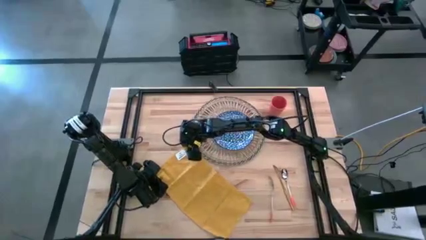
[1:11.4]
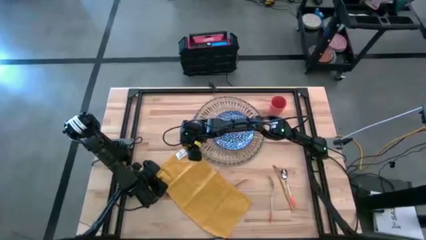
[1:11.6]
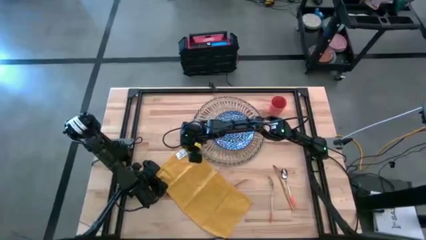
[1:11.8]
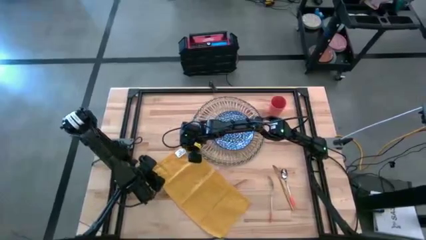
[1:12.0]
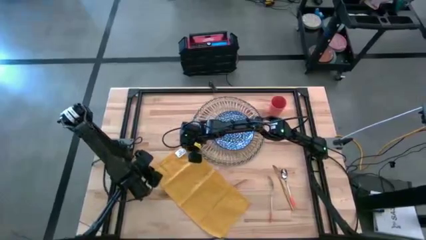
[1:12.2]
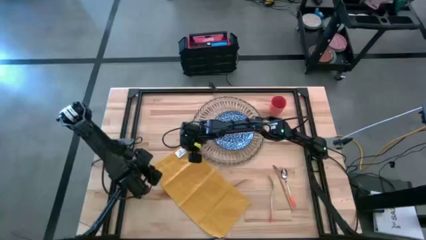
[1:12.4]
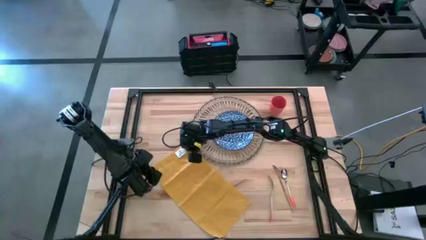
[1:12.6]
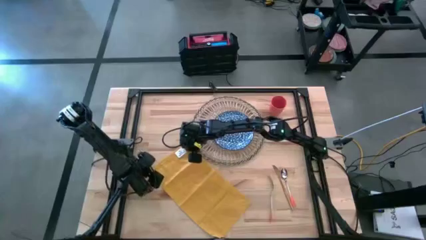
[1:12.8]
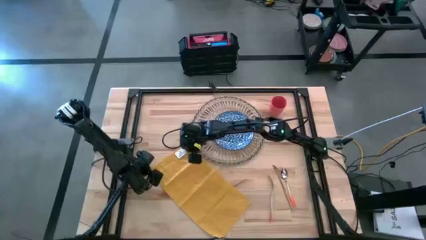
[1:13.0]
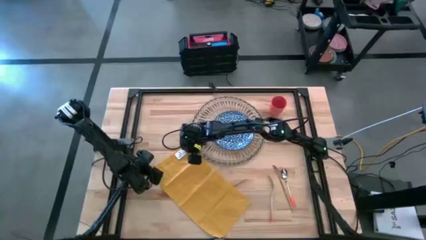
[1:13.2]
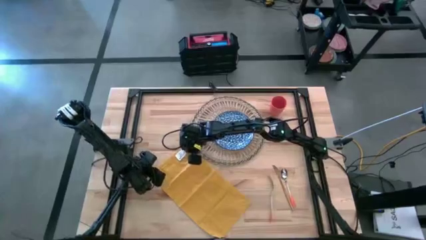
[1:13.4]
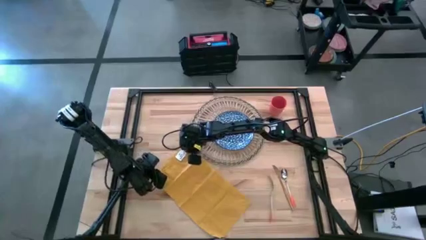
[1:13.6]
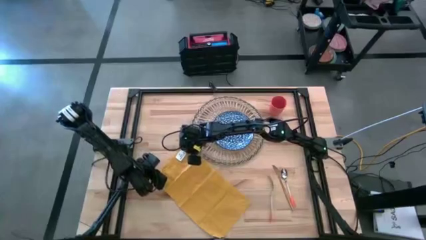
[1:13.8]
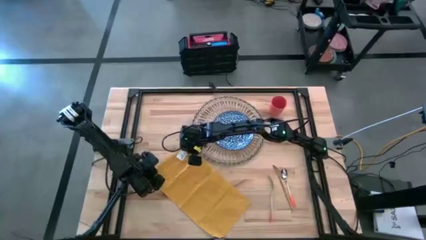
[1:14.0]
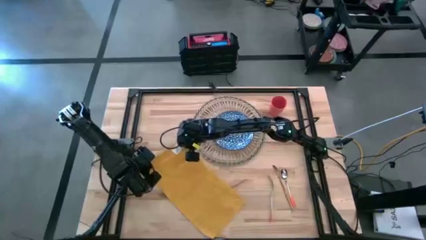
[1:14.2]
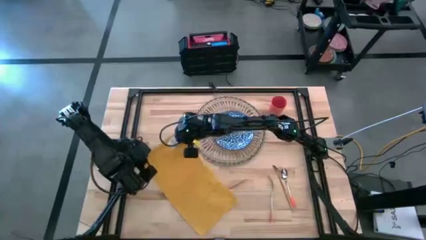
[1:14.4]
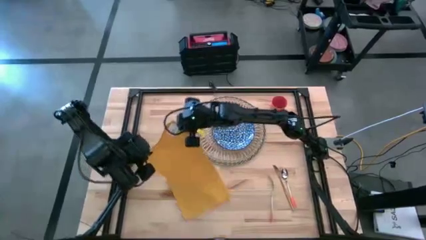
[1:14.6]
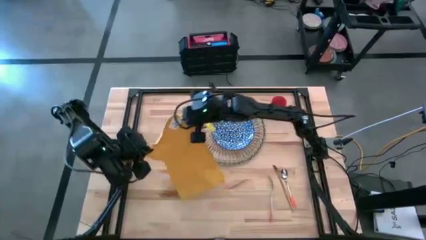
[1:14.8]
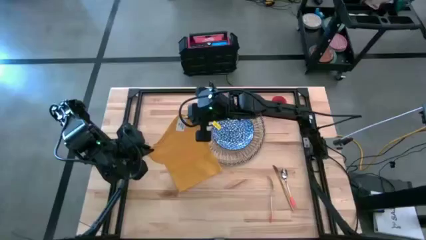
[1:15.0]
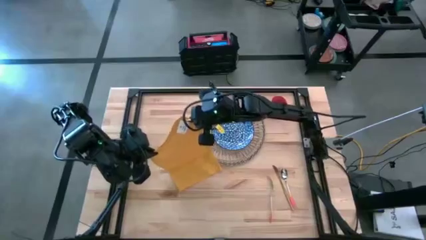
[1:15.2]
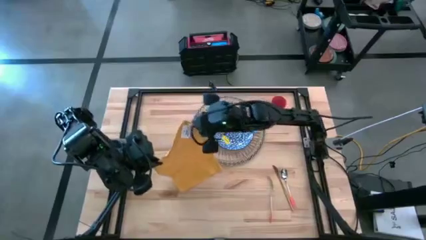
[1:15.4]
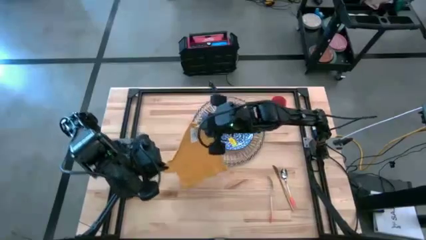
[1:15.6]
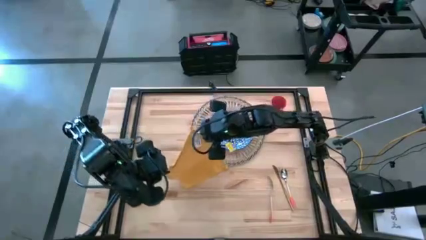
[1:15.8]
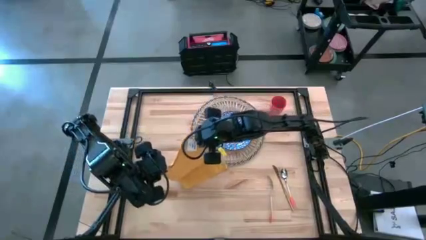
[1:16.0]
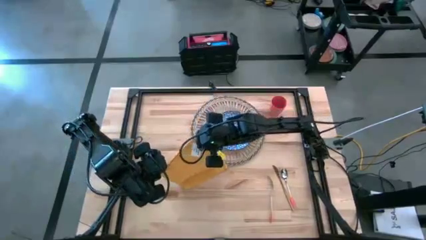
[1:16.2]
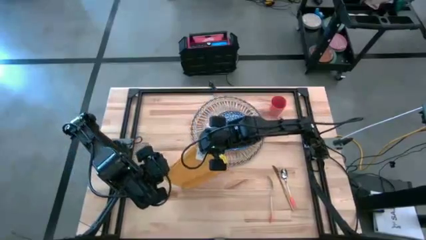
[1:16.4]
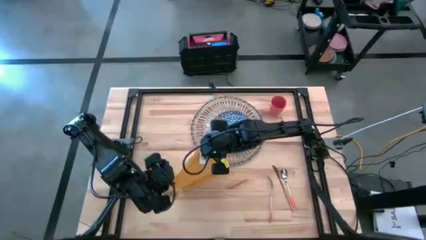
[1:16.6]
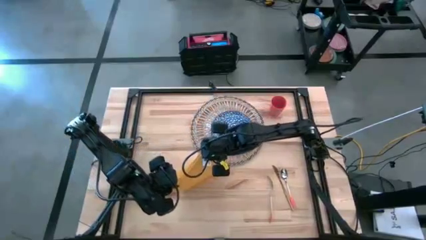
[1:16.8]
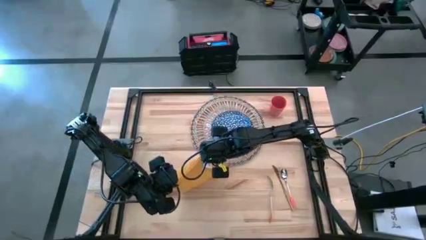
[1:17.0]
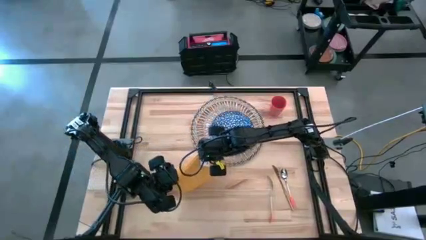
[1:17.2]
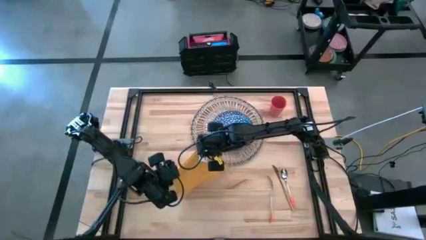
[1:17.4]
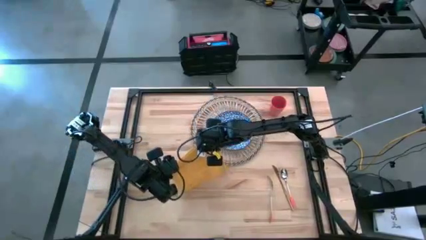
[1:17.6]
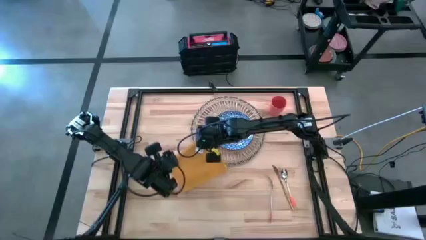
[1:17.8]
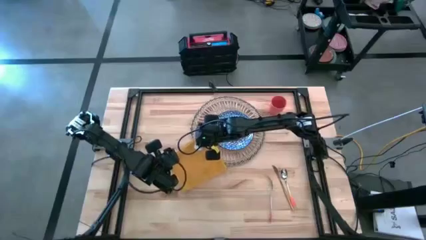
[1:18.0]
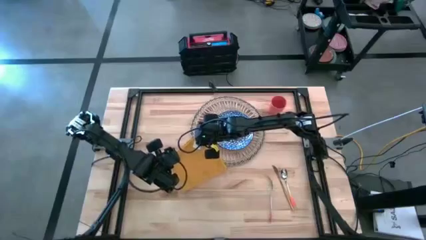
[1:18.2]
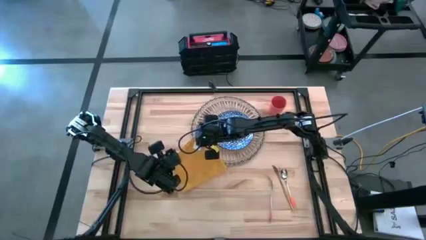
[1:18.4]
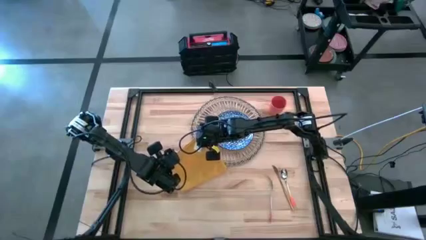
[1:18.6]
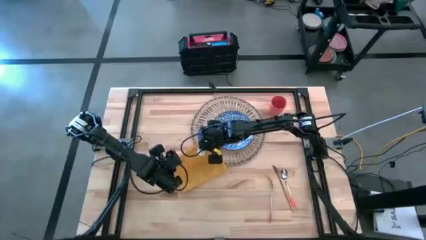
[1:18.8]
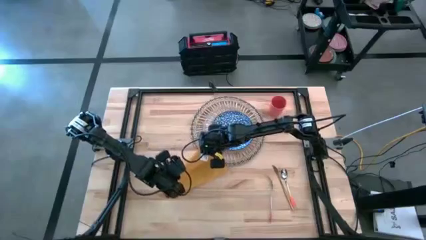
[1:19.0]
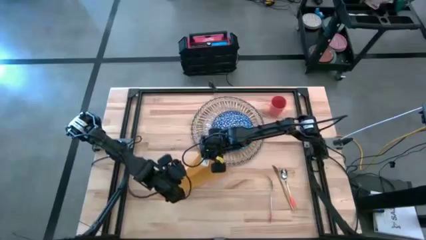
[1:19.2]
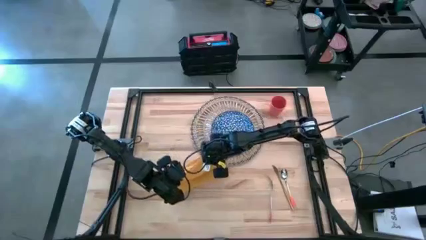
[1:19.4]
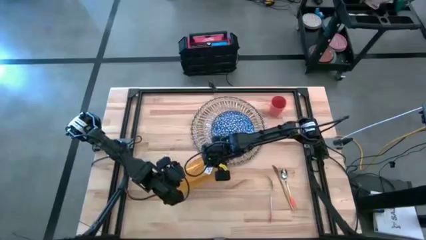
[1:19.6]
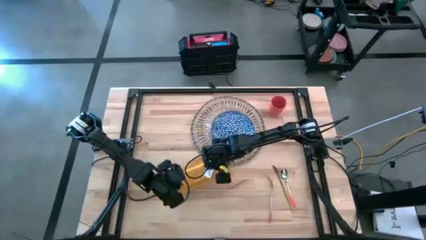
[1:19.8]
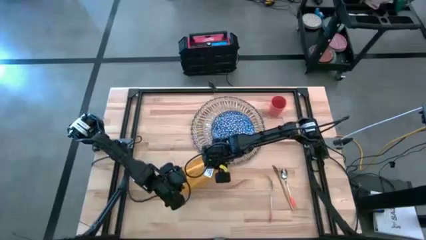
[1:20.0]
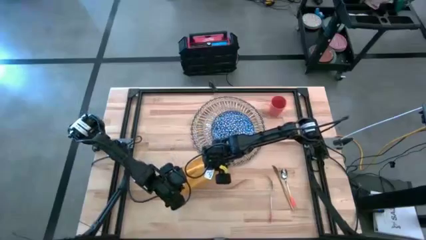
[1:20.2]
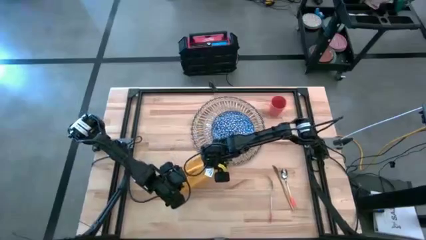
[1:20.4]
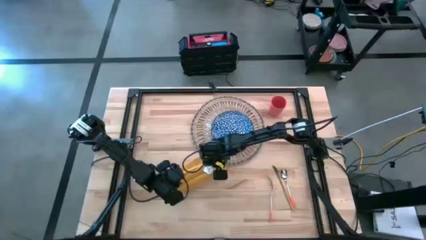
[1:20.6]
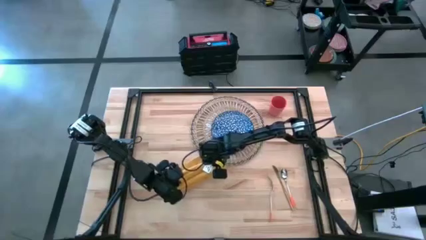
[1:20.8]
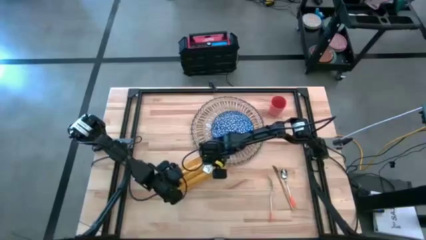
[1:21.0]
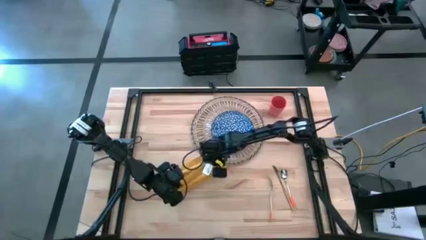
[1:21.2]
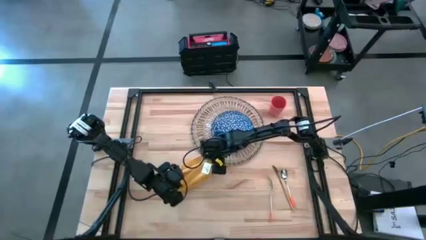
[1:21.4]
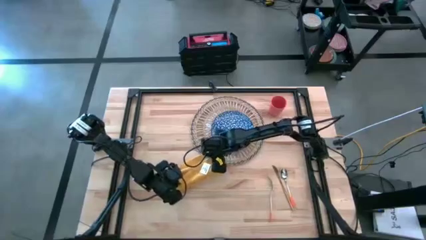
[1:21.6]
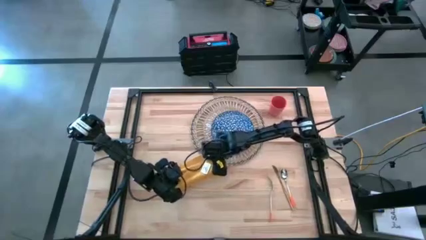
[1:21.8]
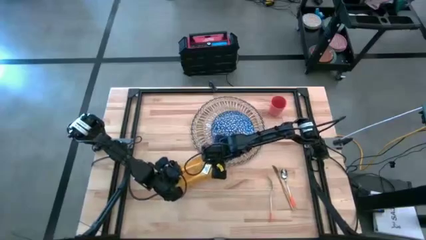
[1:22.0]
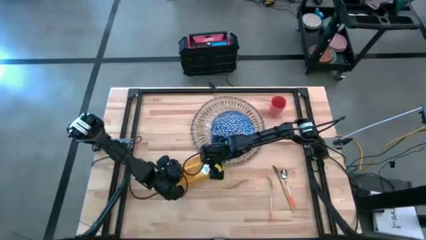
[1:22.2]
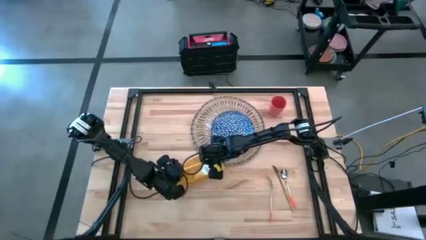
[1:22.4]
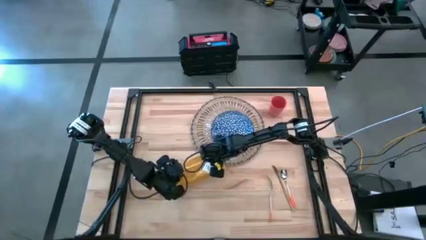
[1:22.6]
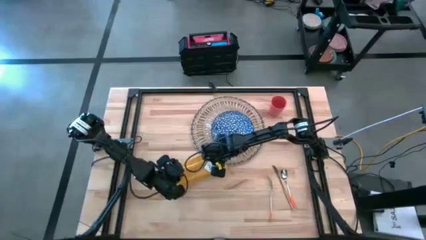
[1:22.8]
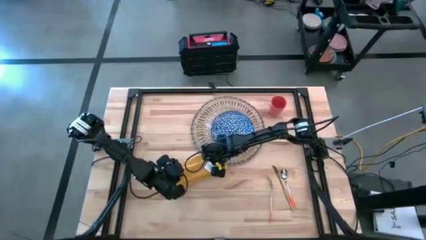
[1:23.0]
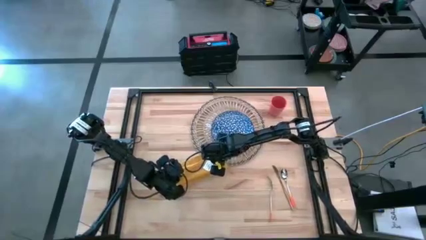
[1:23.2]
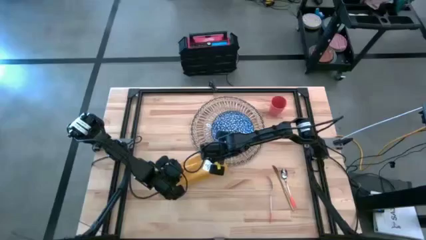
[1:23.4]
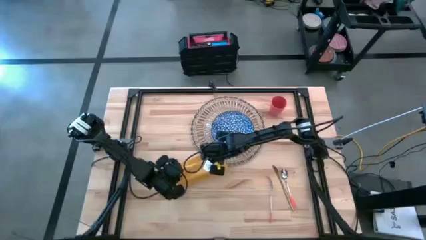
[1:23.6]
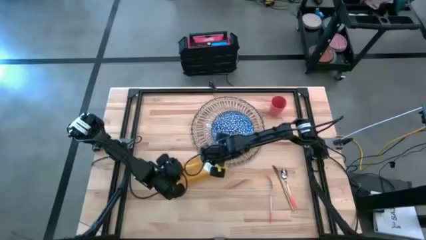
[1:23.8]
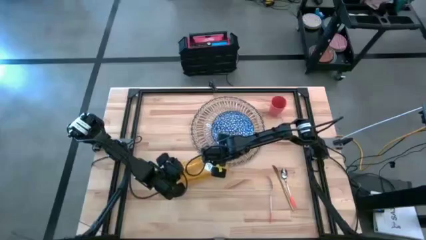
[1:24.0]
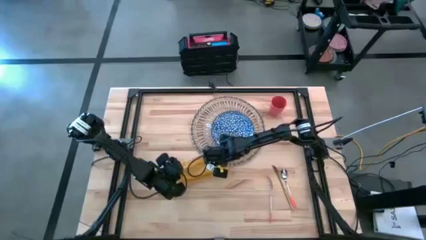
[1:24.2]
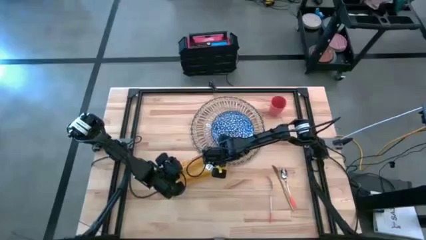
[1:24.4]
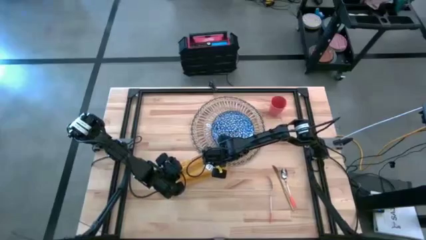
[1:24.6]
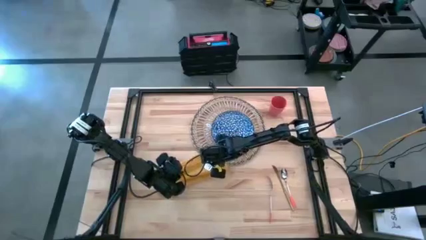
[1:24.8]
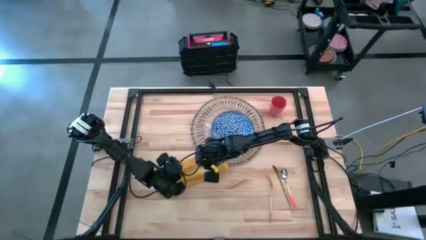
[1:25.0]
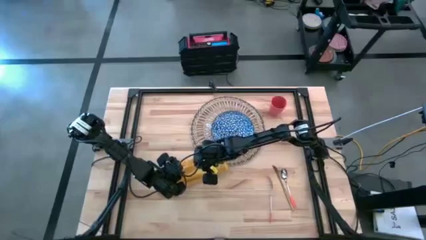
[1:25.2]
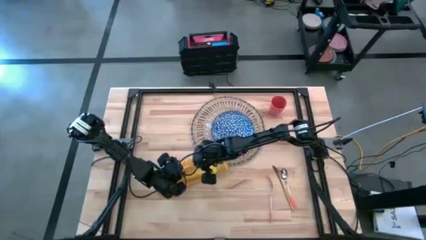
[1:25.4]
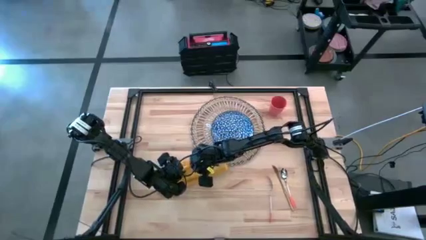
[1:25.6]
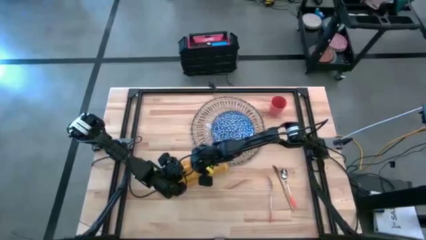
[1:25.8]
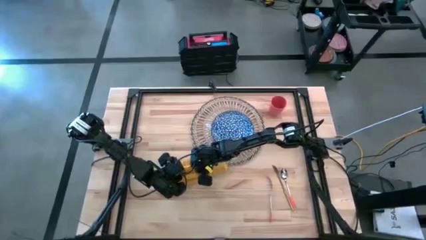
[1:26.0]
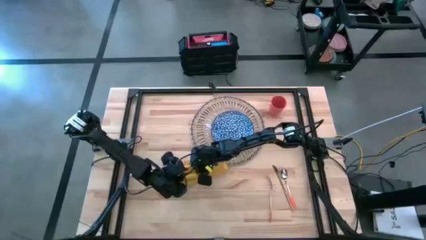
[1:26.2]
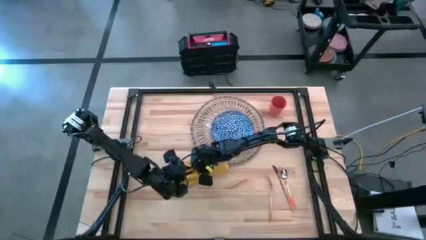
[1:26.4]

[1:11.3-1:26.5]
Task: Set table place
Fold the yellow table napkin
